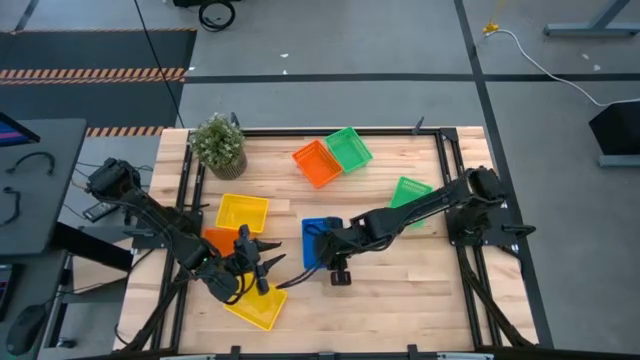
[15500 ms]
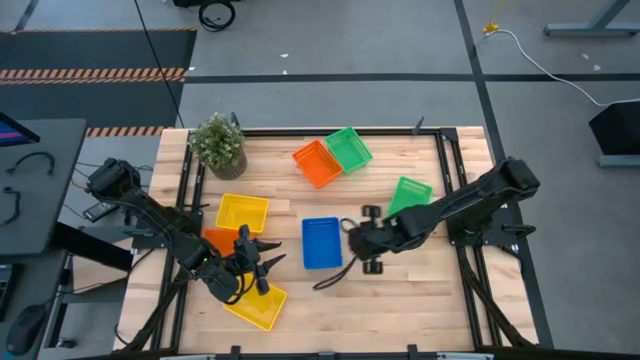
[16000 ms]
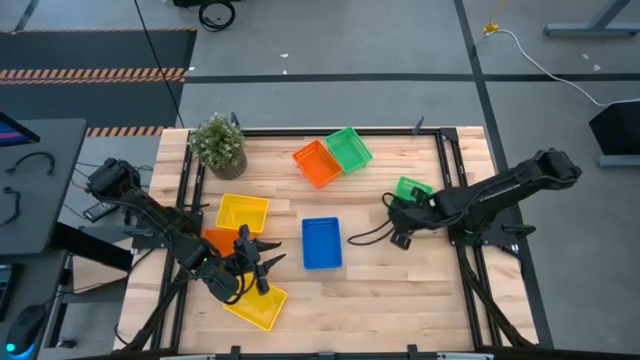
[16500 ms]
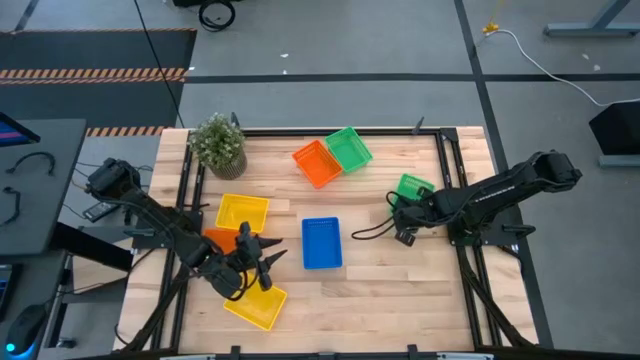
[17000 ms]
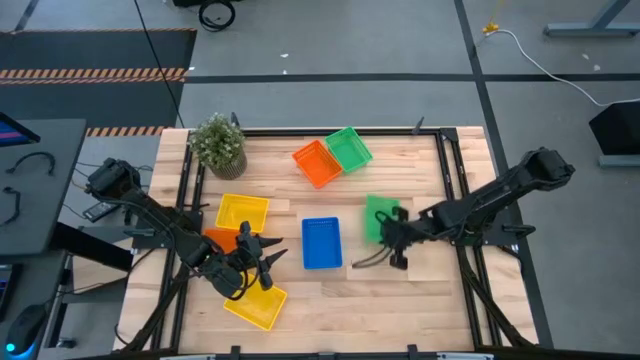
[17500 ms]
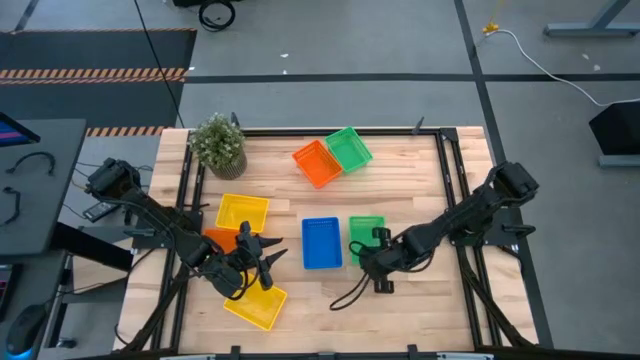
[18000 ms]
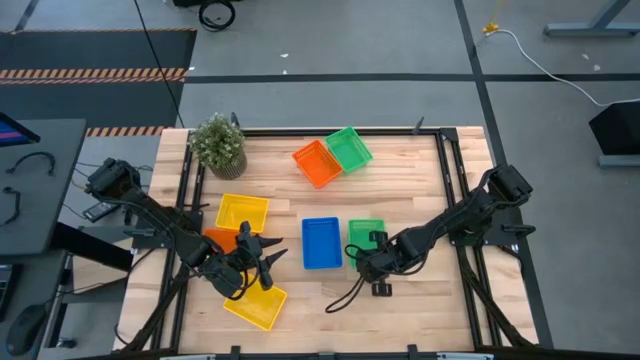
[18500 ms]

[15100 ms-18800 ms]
Move the bottom green bin to the center of the table

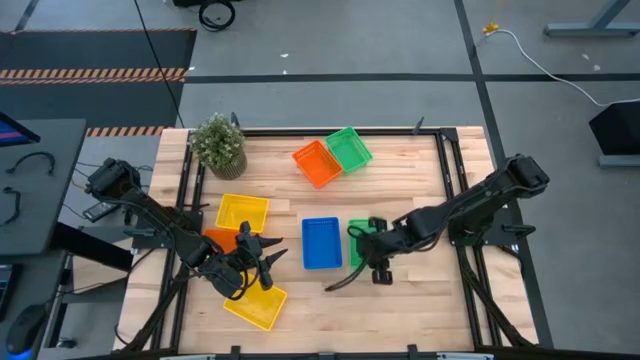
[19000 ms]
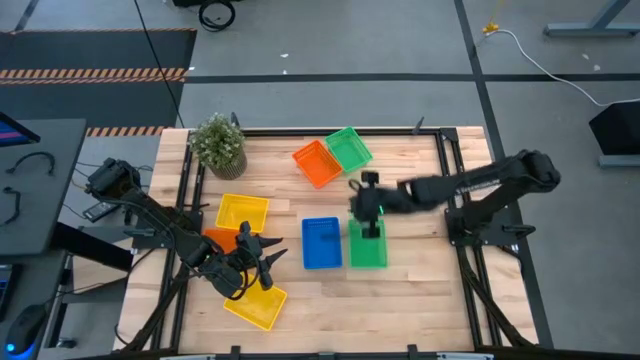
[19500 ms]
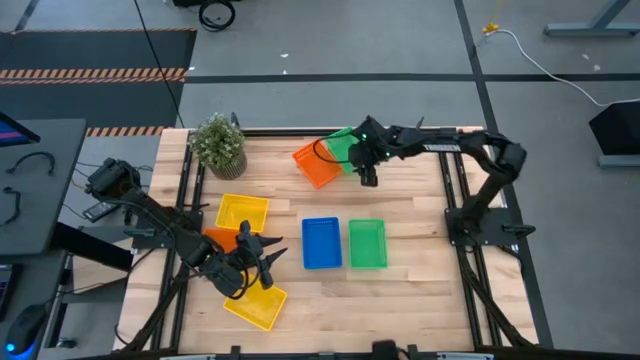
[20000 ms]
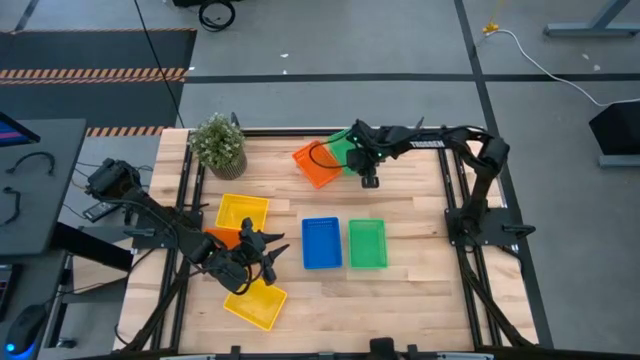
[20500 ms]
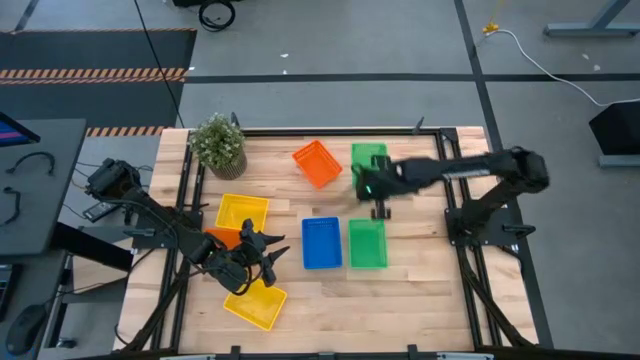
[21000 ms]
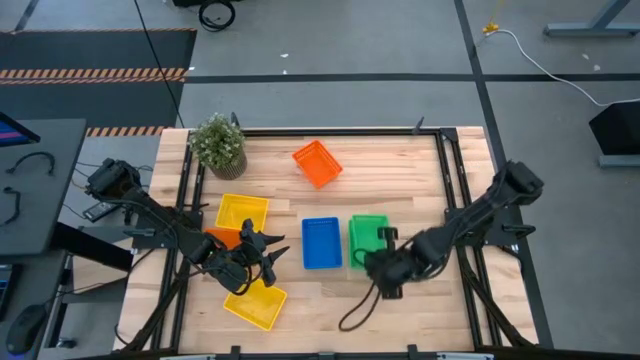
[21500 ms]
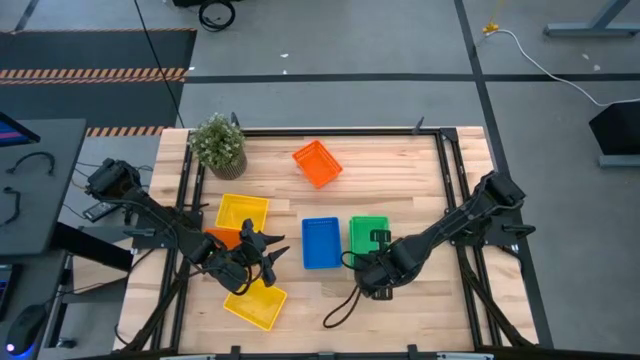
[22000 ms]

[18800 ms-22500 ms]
Stack the top green bin on top of the bottom green bin

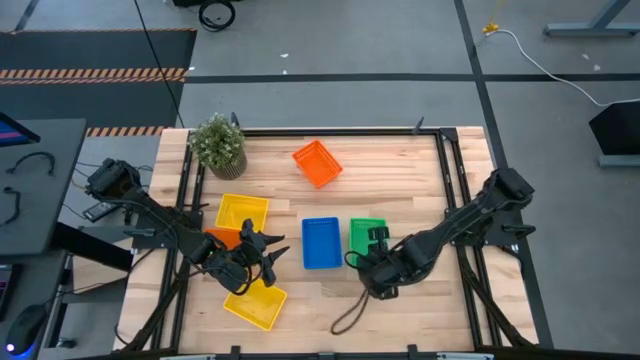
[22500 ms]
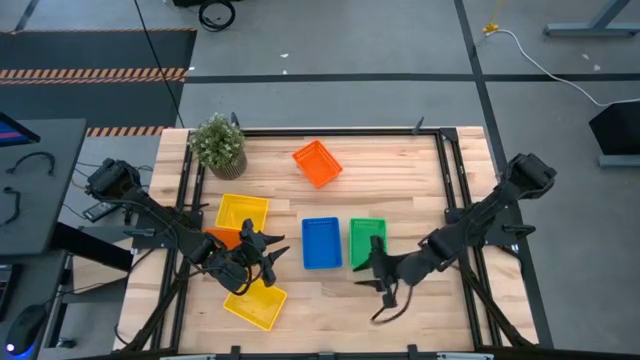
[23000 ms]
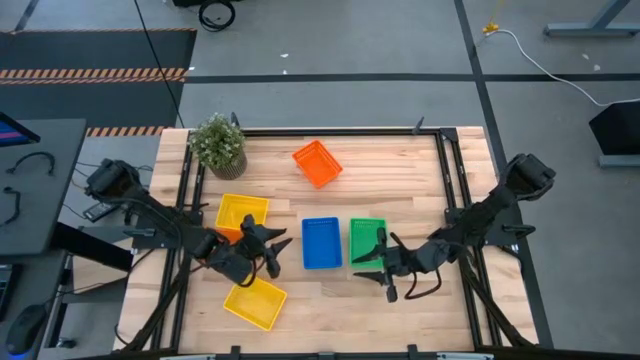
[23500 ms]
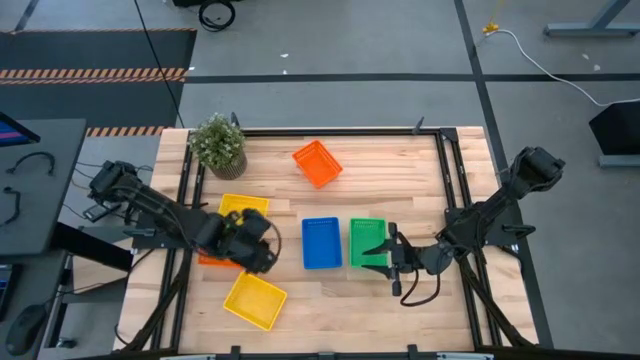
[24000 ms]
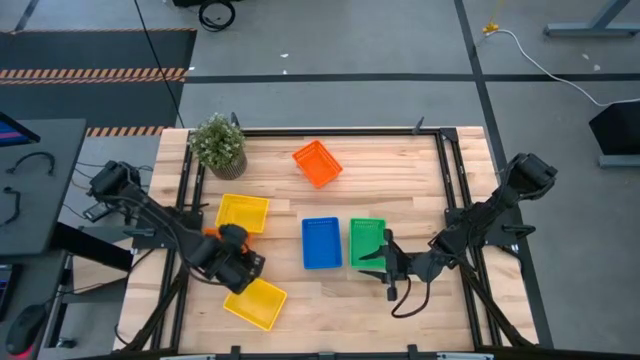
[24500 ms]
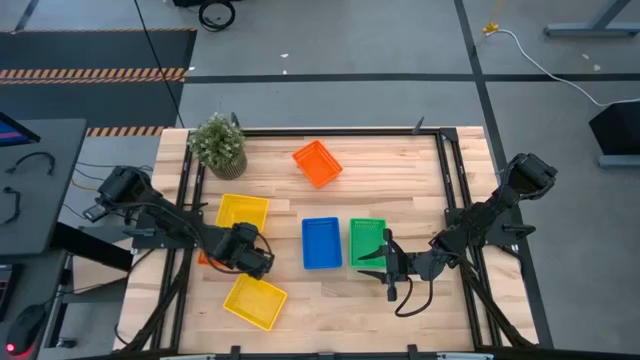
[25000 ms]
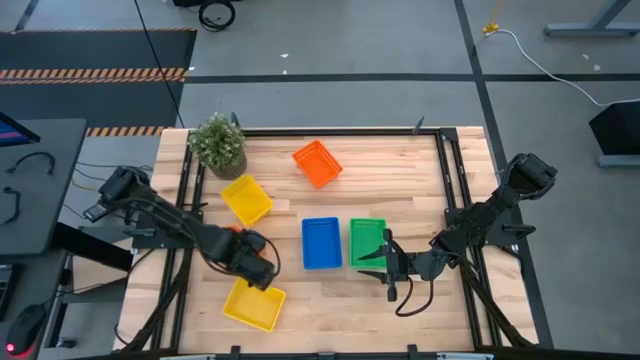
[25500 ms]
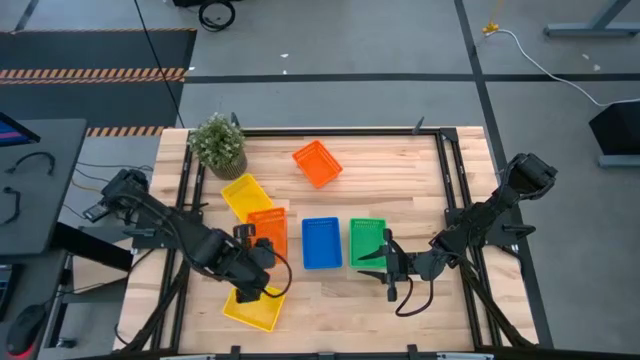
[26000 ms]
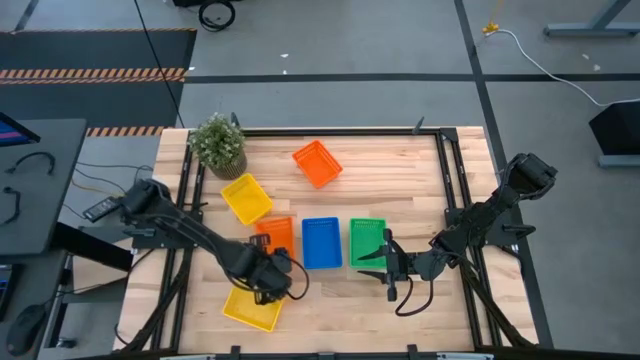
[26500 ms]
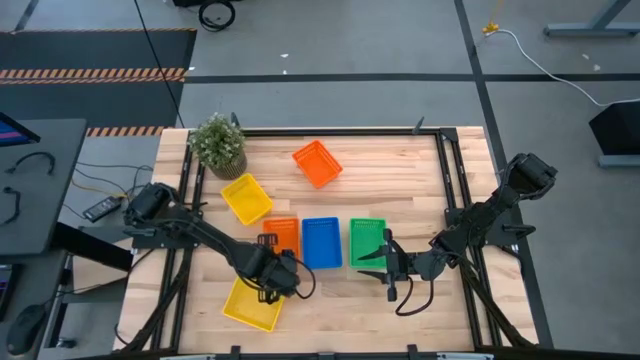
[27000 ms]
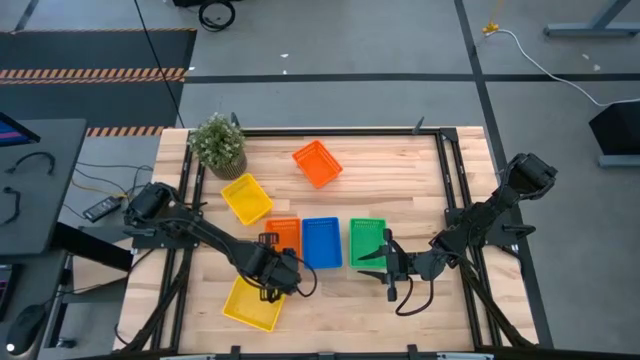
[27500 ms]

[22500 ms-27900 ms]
Move the bottom orange bin to the right of the blue bin

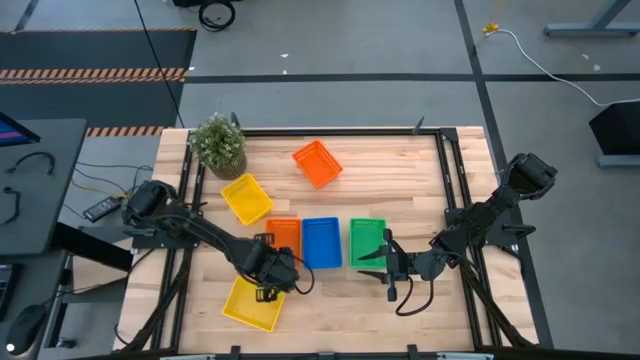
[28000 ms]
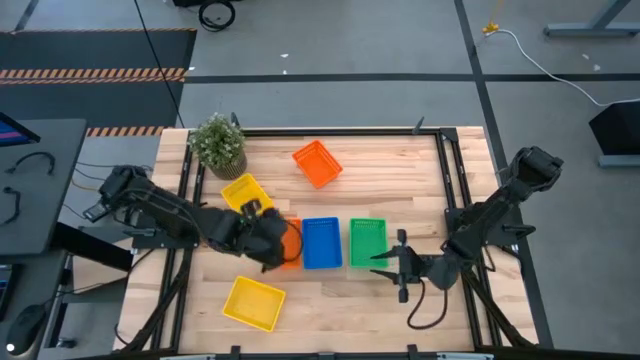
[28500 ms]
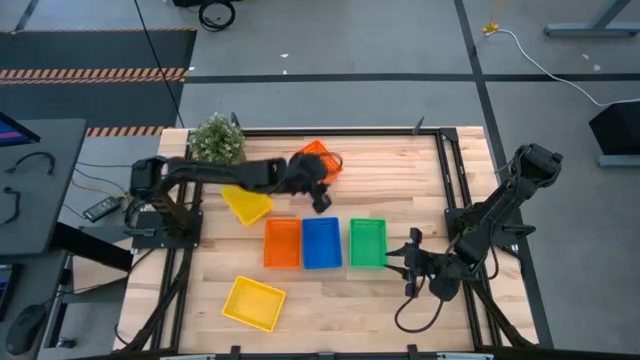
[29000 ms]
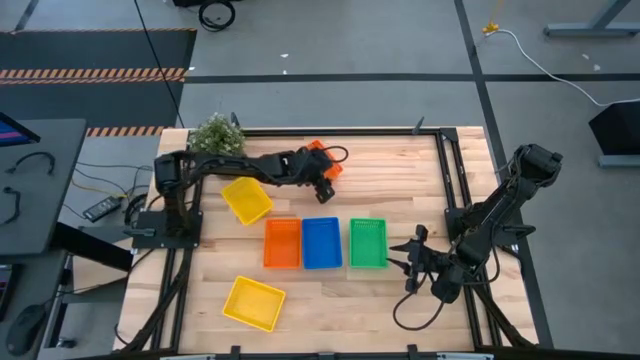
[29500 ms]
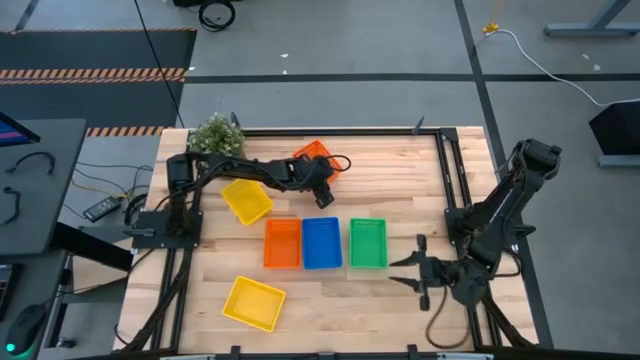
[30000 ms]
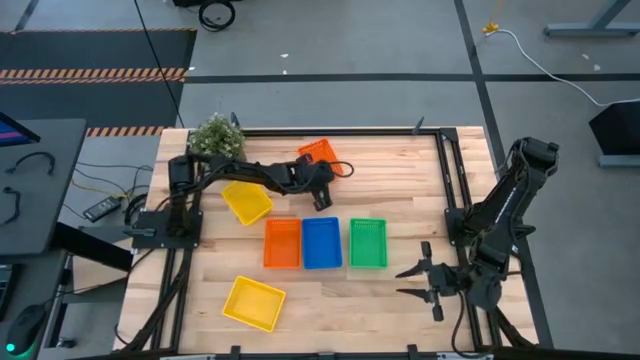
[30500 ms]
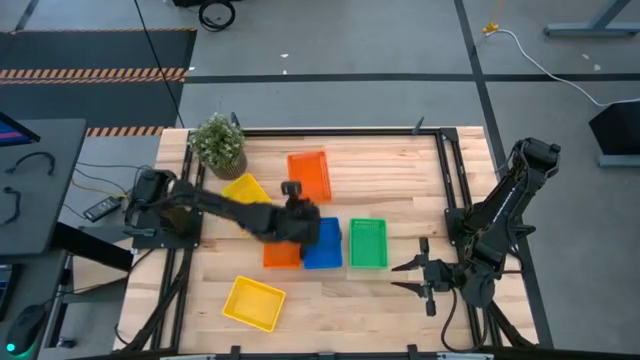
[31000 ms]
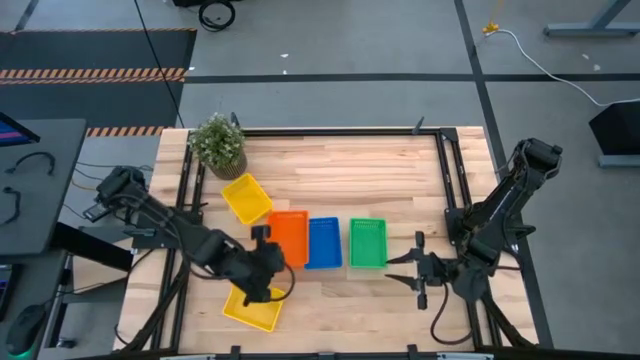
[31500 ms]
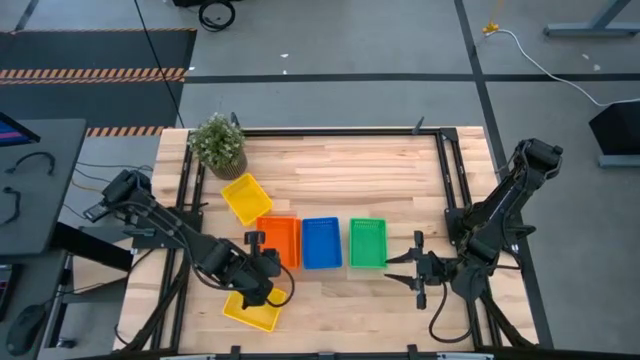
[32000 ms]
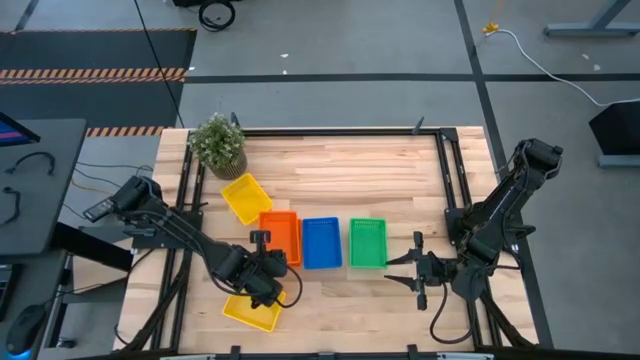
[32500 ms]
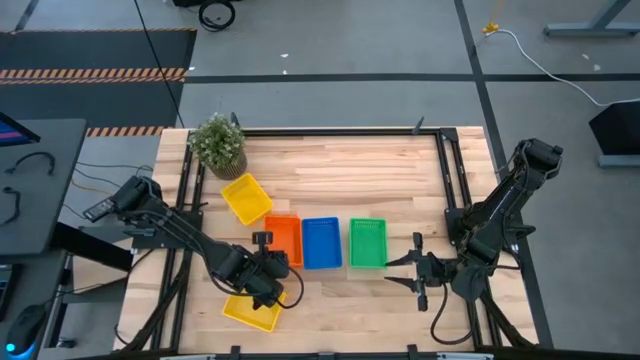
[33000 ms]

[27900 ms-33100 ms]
Stack the top orange bin on top of the bottom orange bin

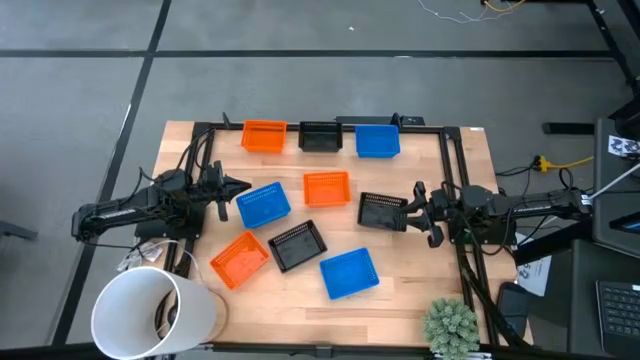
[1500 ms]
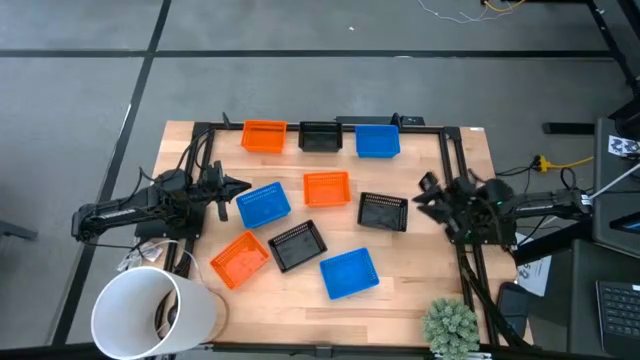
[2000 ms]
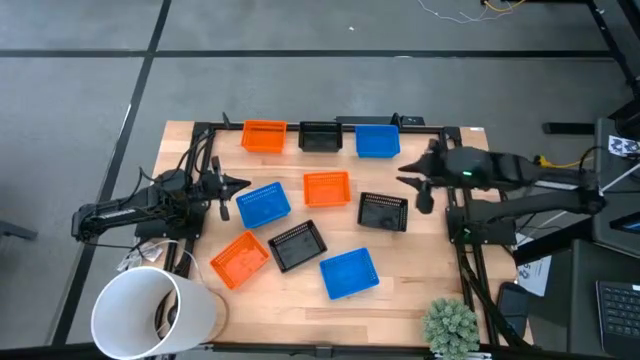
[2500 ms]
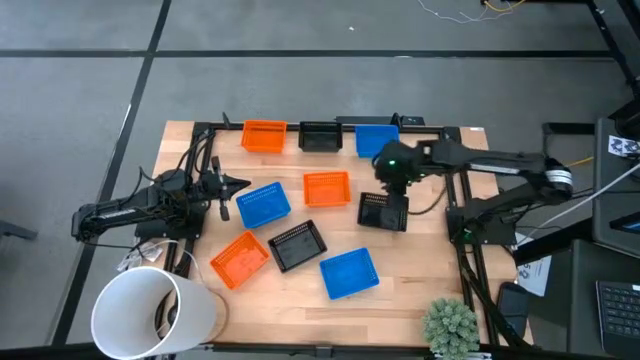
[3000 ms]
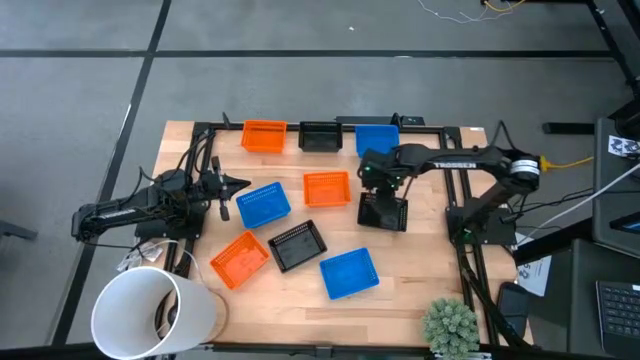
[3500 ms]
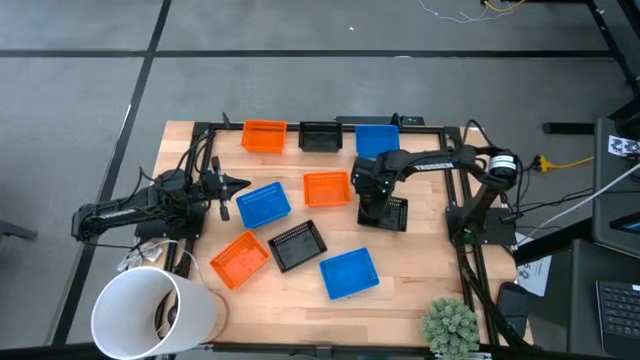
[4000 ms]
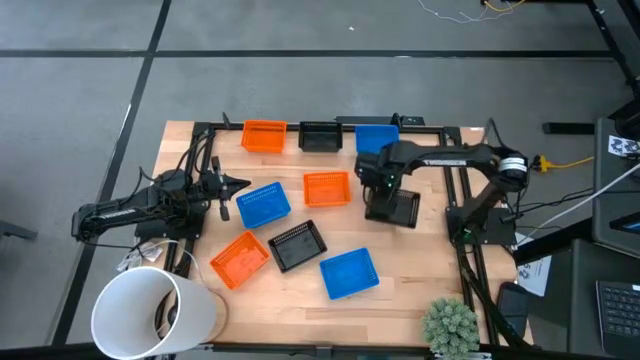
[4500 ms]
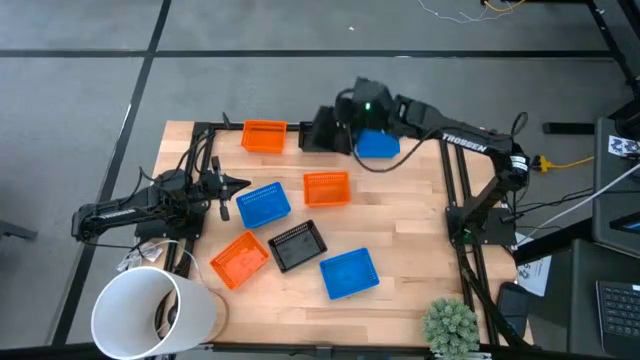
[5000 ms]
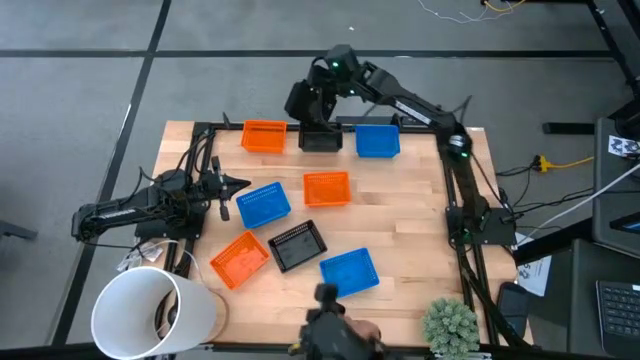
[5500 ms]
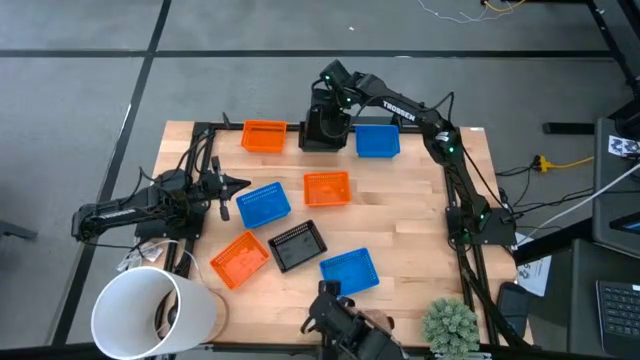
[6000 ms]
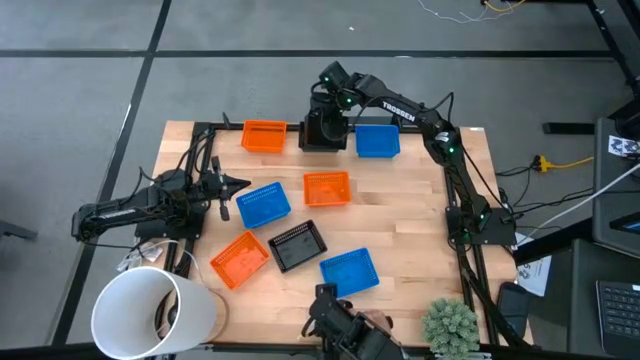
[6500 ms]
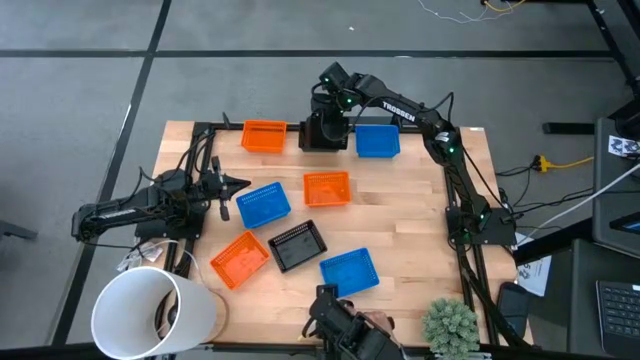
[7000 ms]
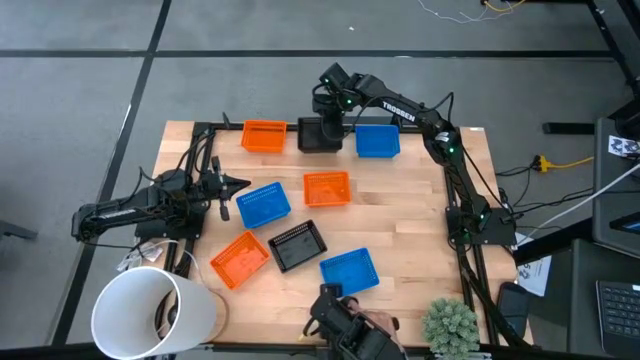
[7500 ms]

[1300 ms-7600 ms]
Stack the right black basket on top of the other black basket
